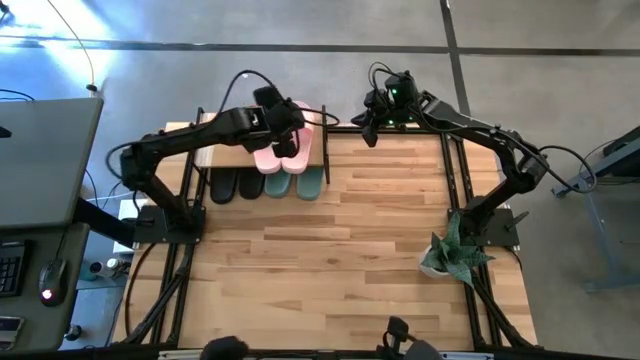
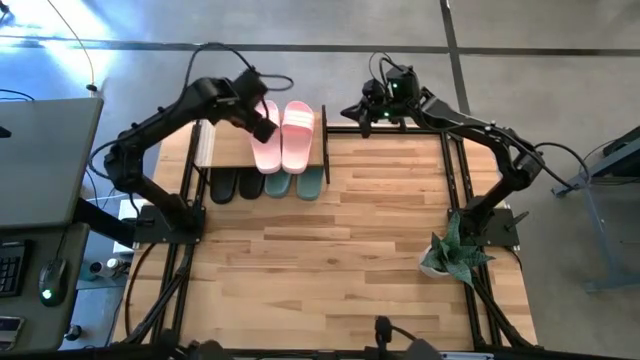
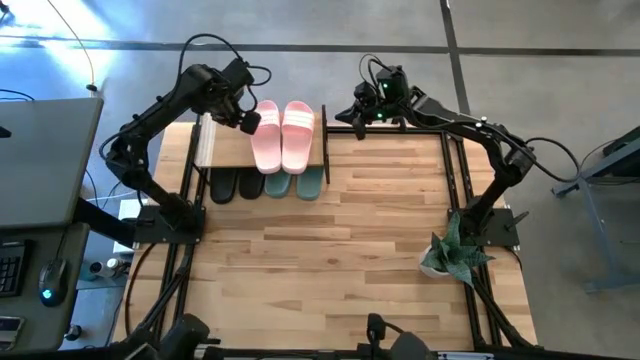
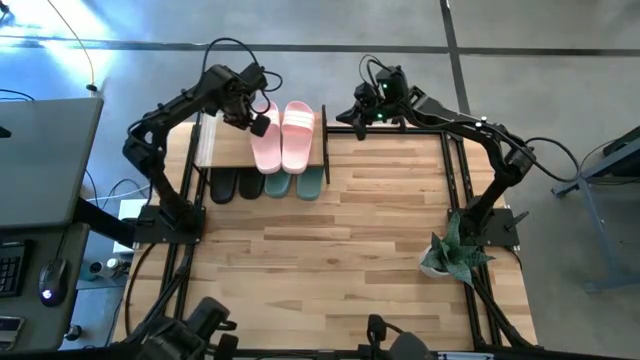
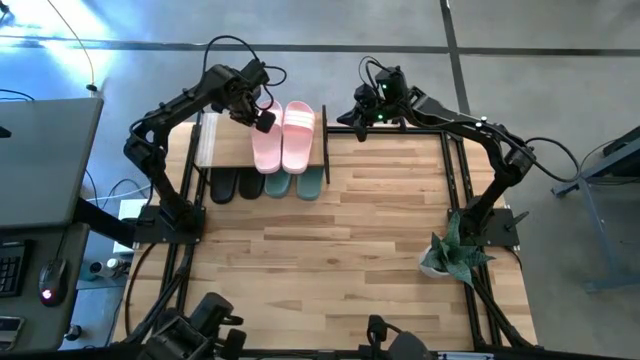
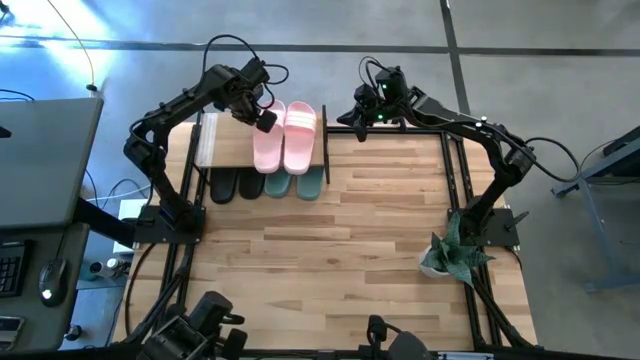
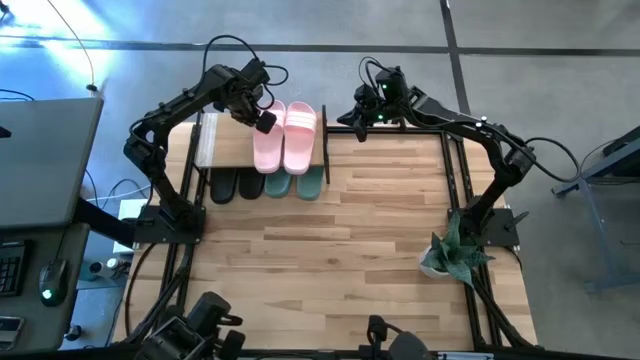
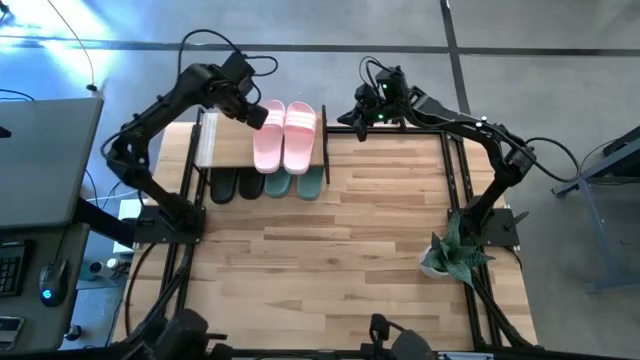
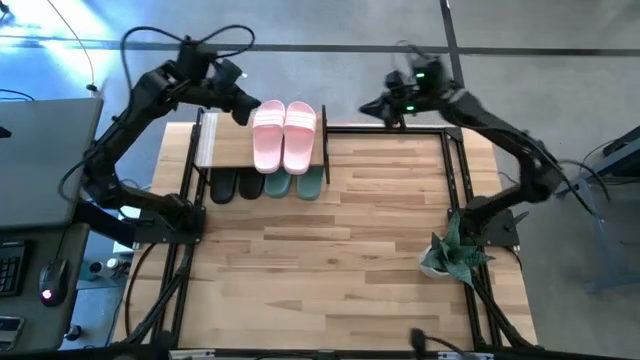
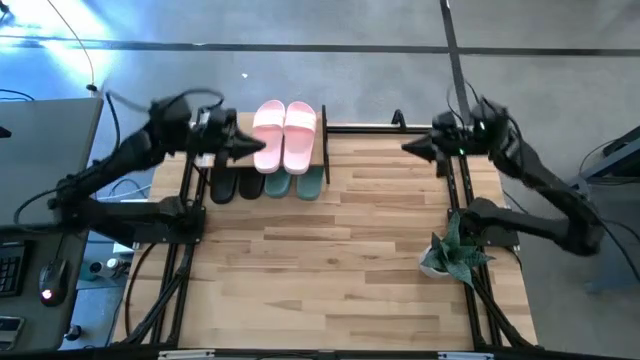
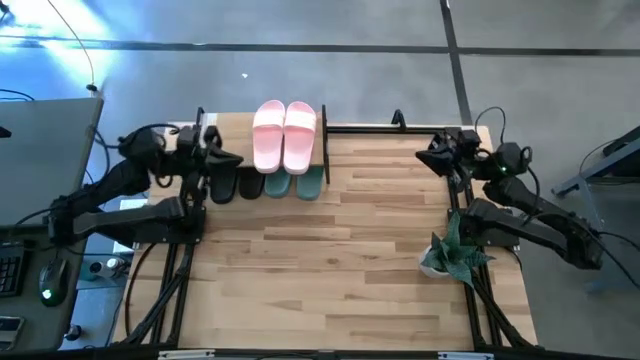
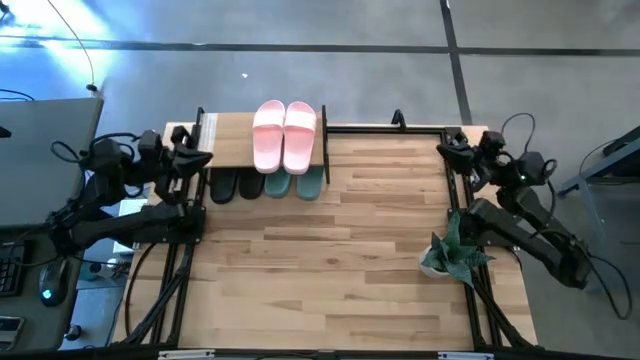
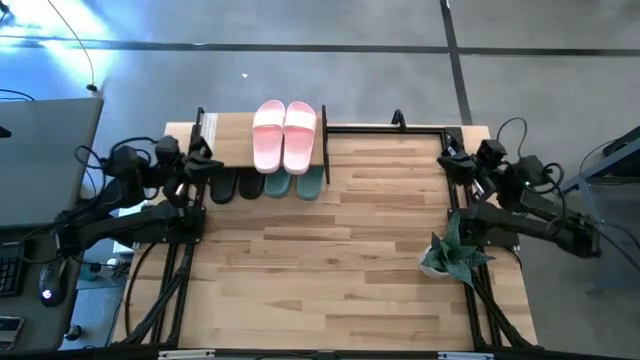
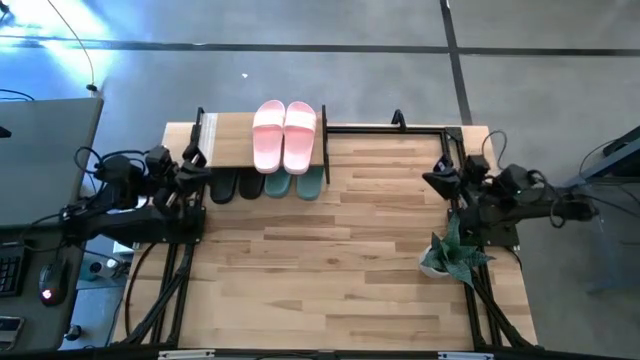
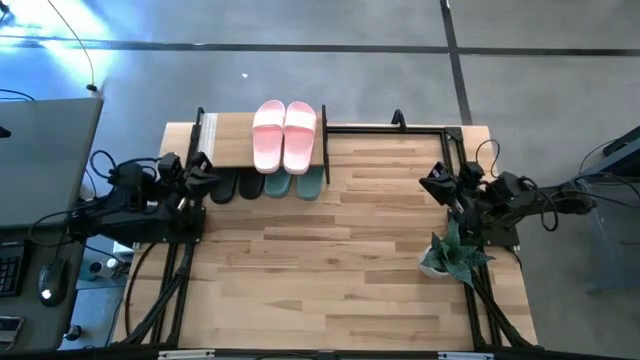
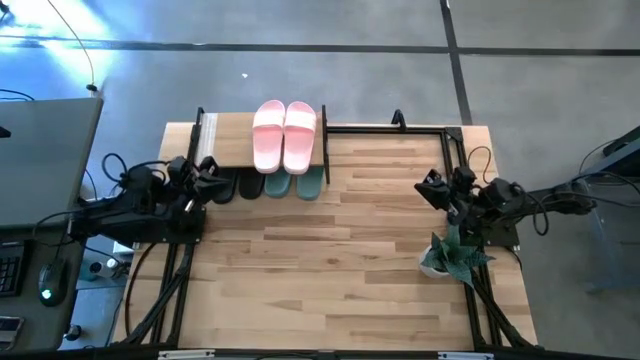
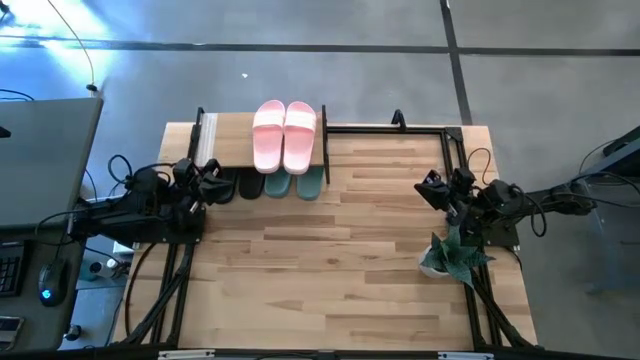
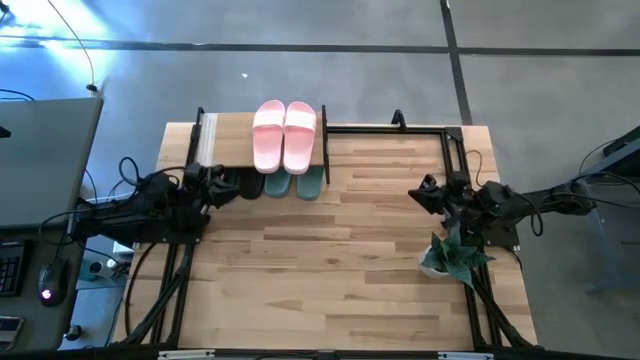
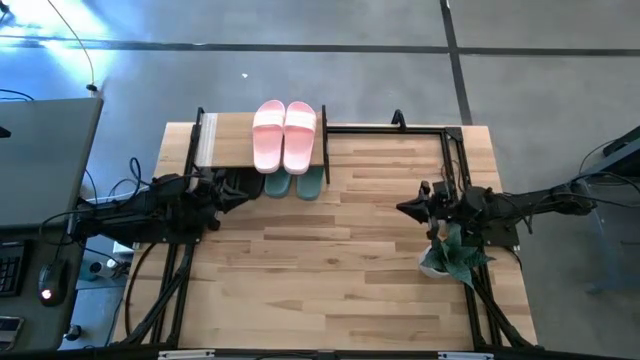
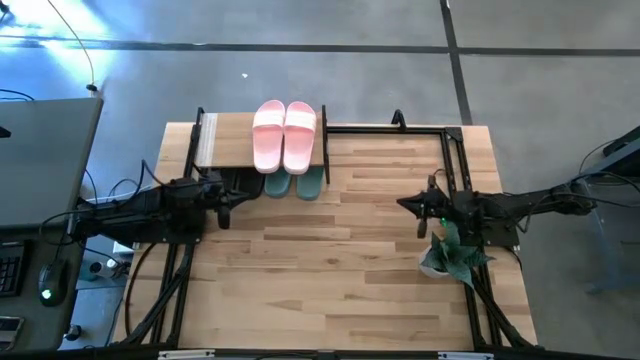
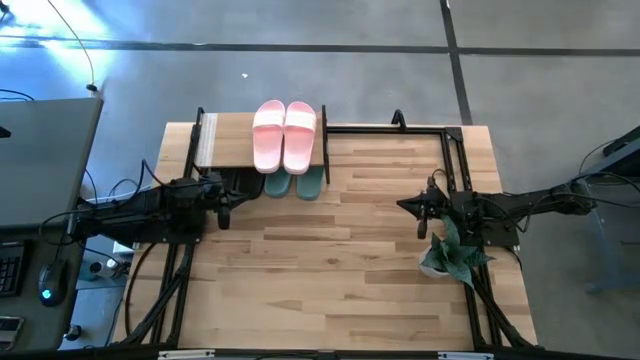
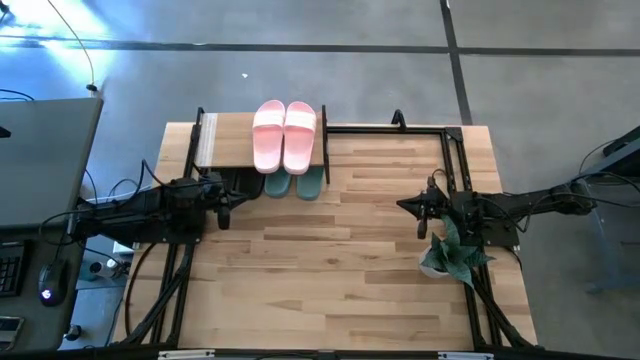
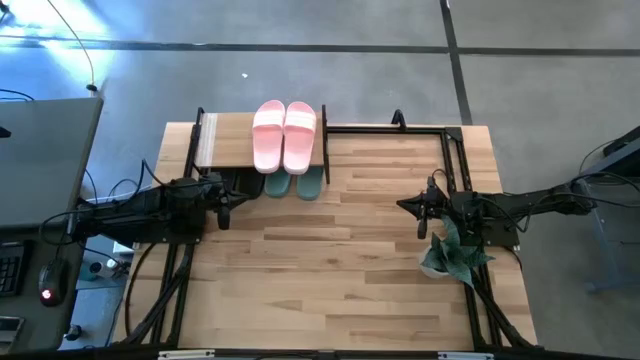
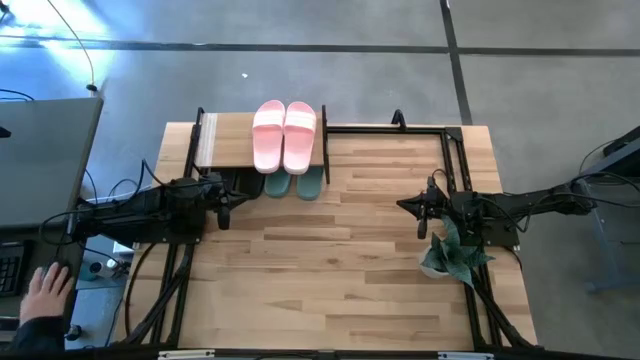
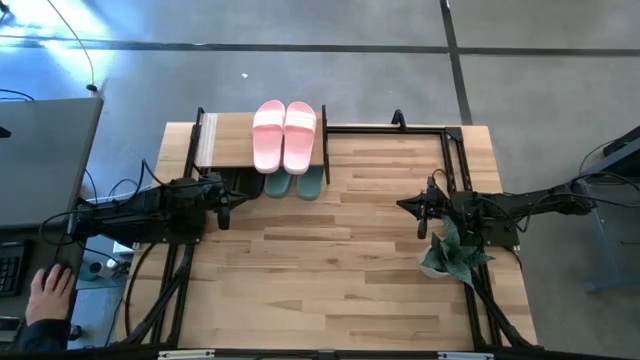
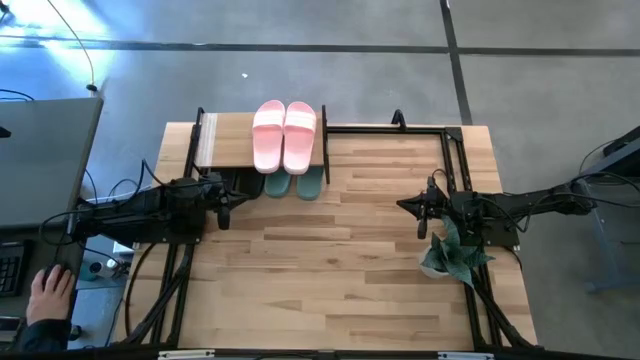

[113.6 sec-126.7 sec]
Task: Pick and place slides into the shelf
Return to Home Position

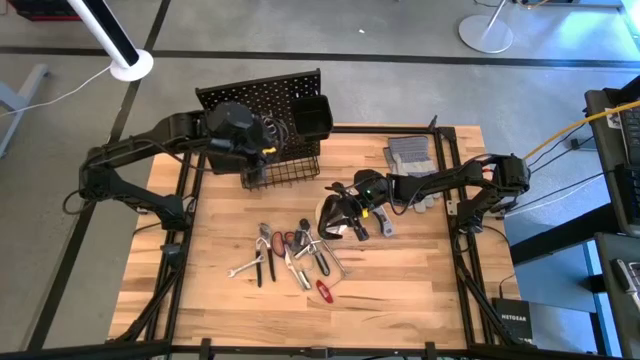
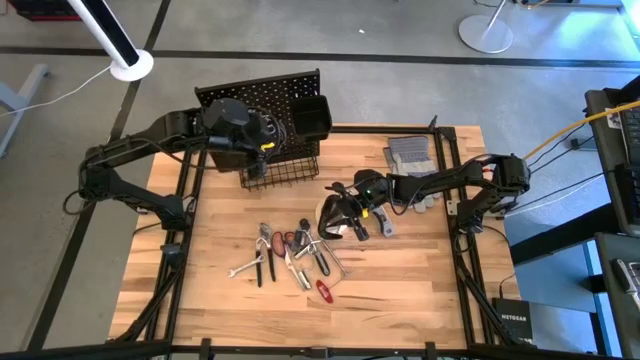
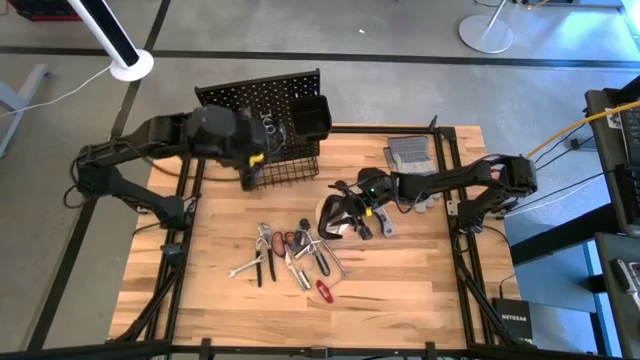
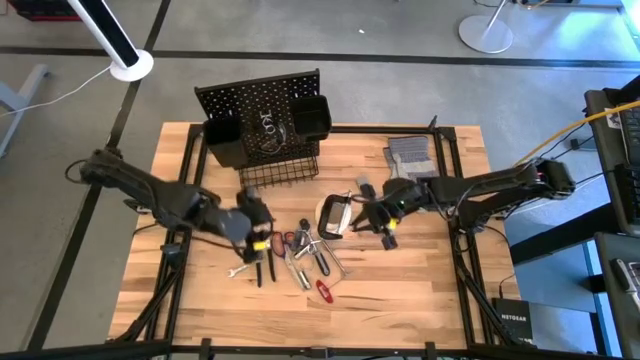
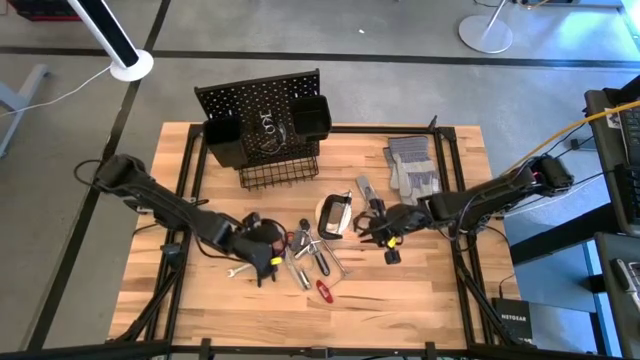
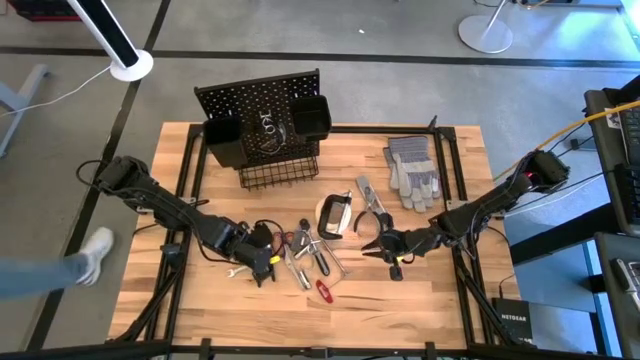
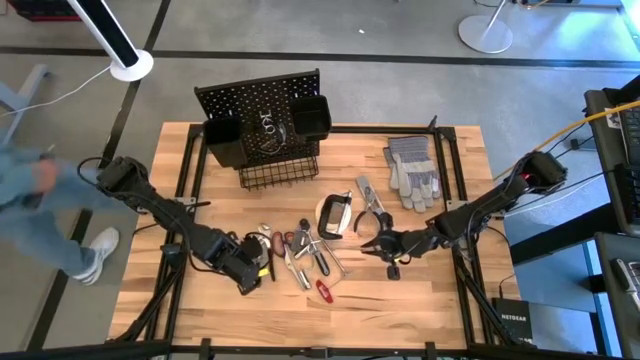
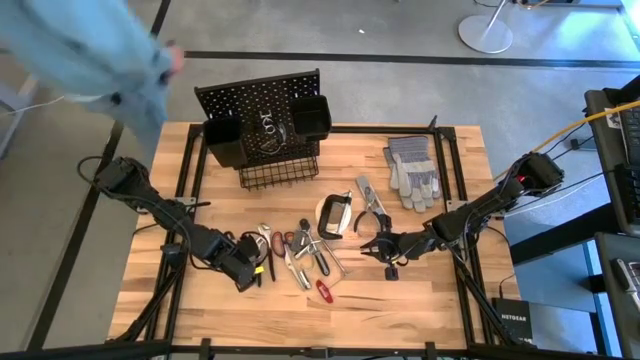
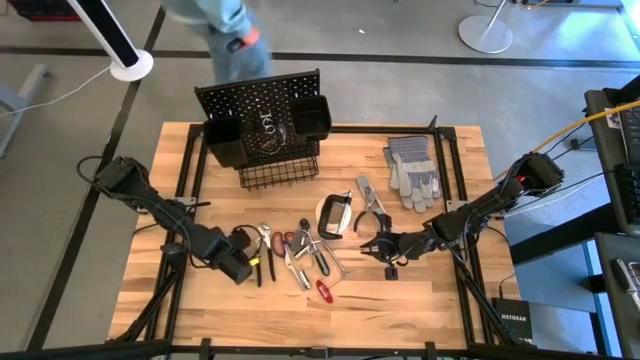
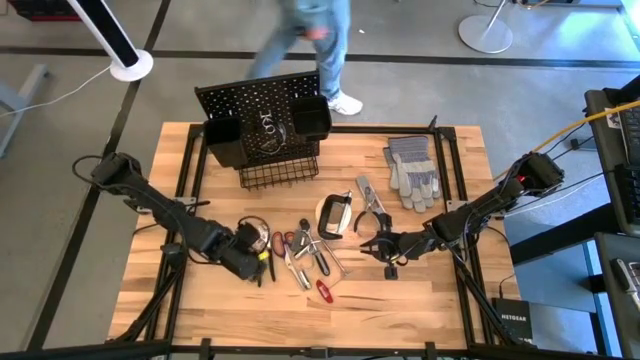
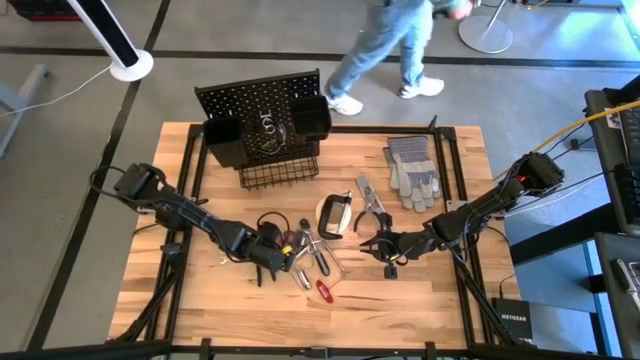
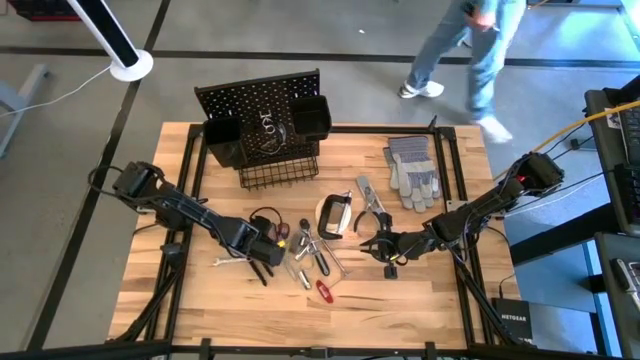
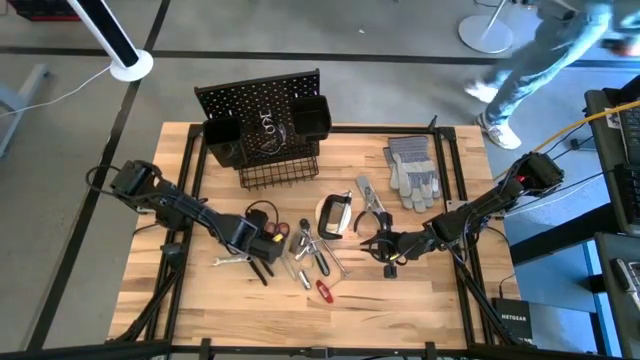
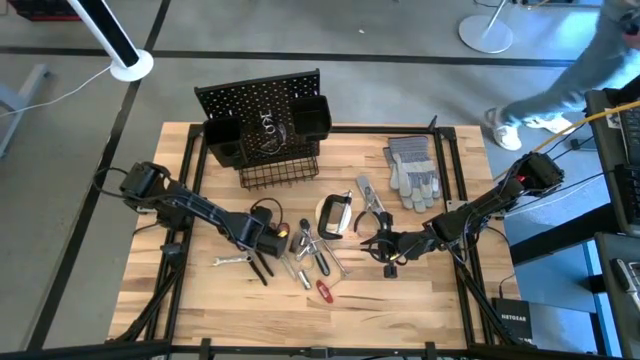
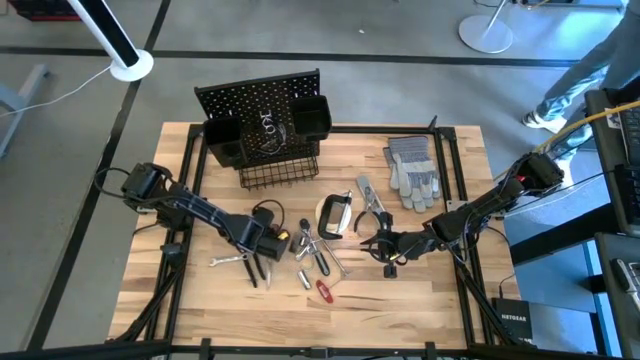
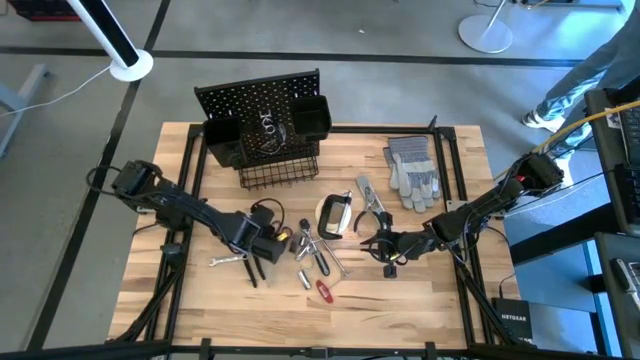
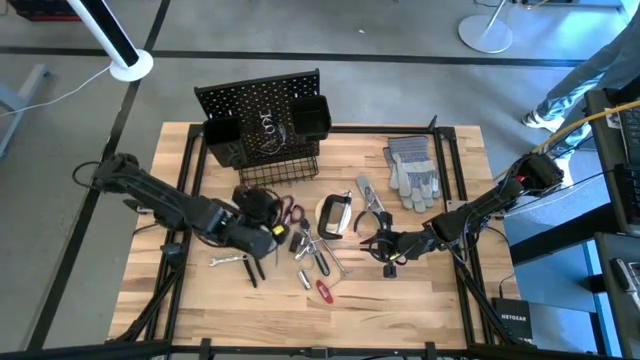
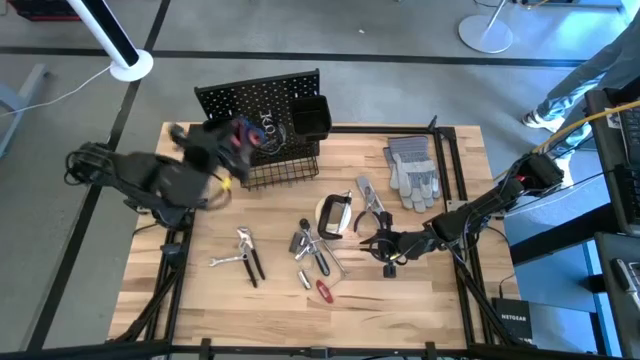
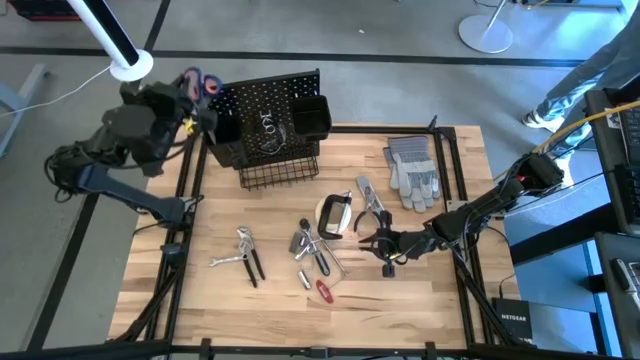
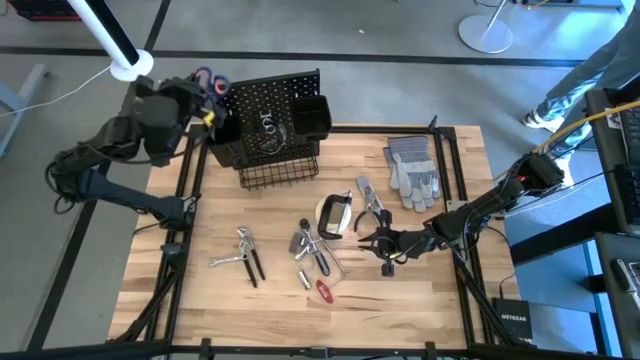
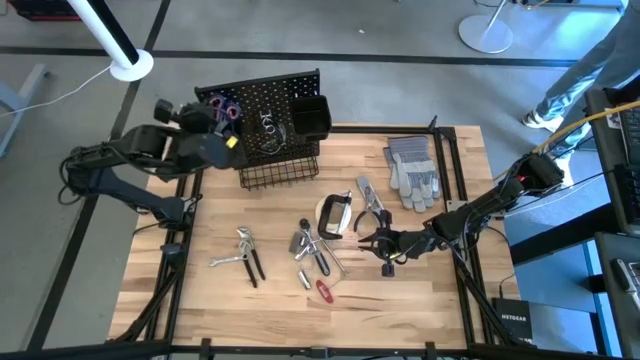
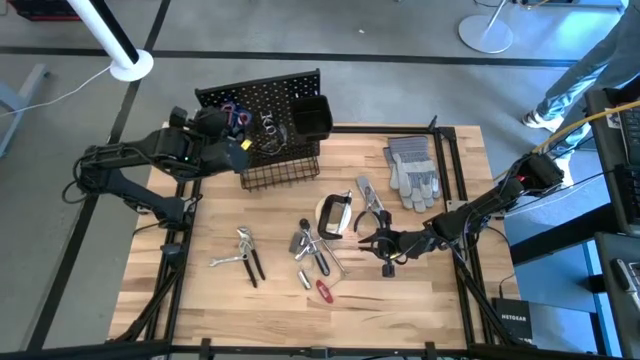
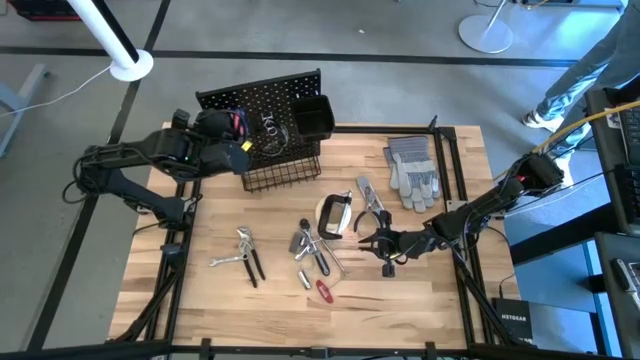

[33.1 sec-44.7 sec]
Task: Hang tools onto peg board
Put the blue scissors into the left black bin on the pegboard
